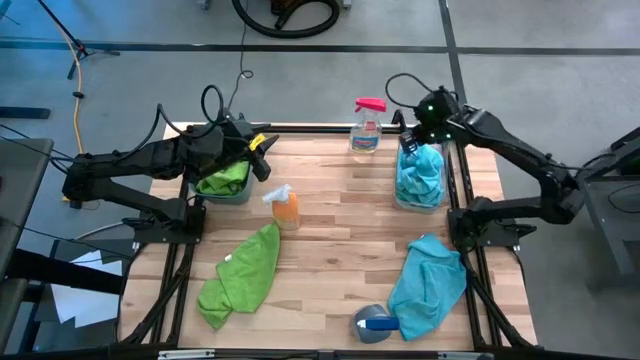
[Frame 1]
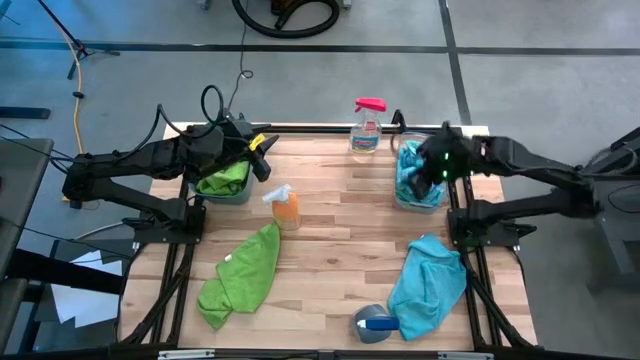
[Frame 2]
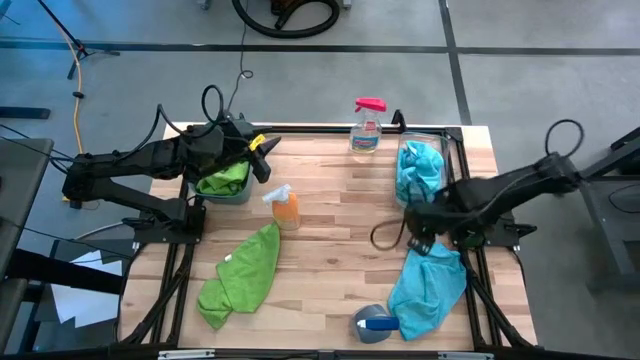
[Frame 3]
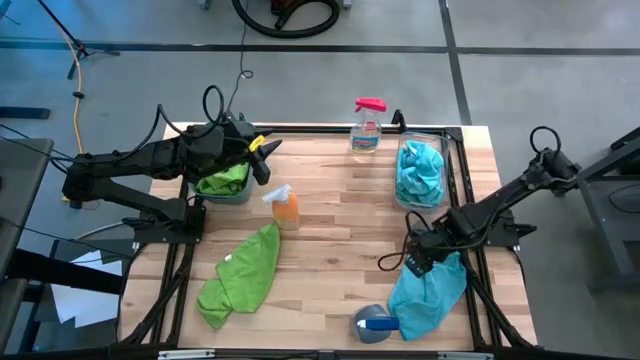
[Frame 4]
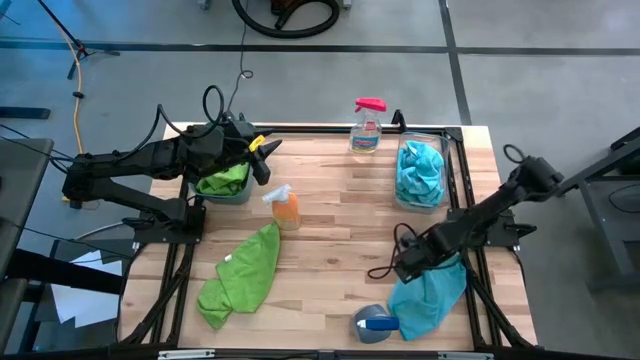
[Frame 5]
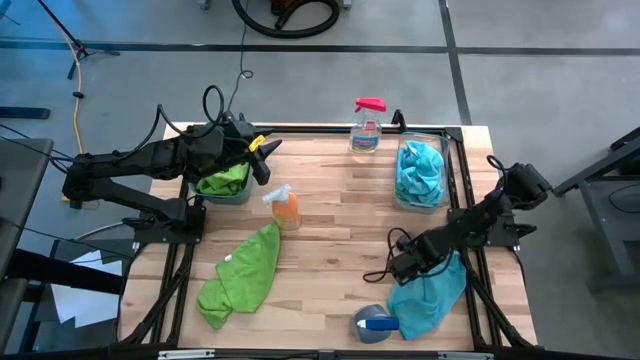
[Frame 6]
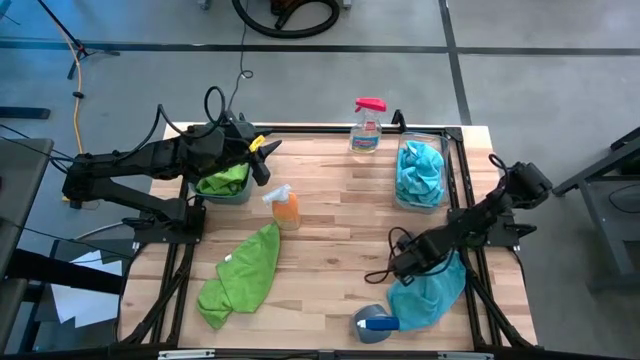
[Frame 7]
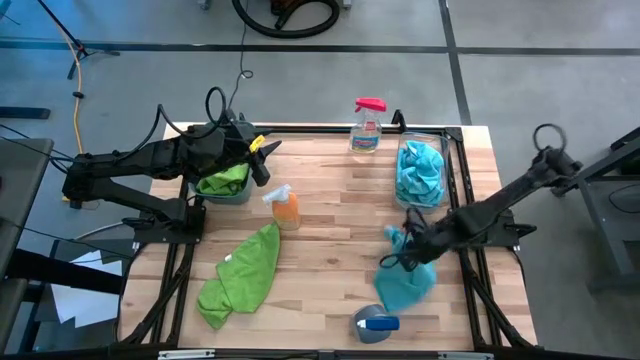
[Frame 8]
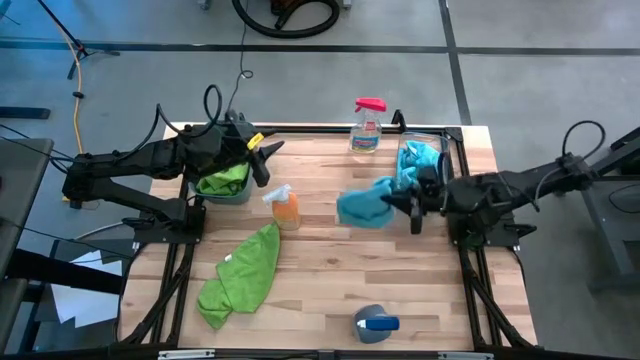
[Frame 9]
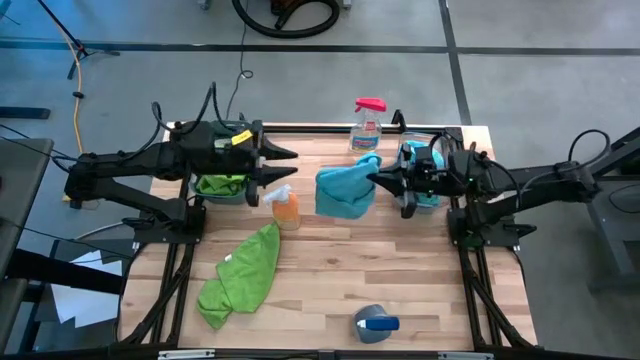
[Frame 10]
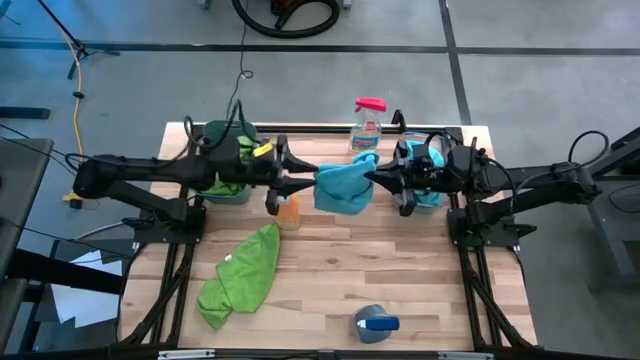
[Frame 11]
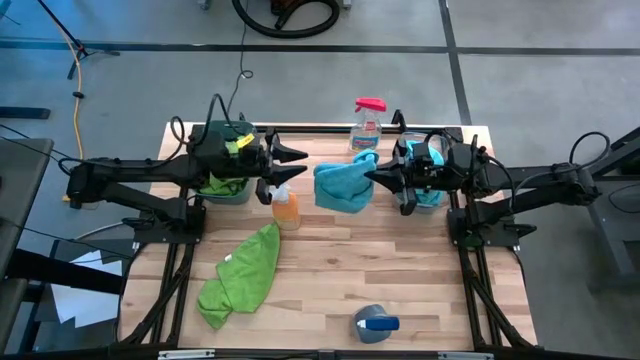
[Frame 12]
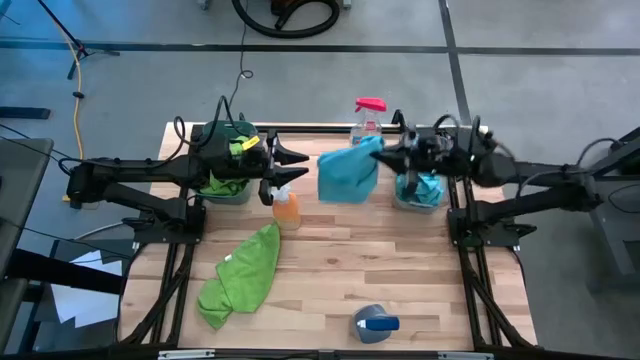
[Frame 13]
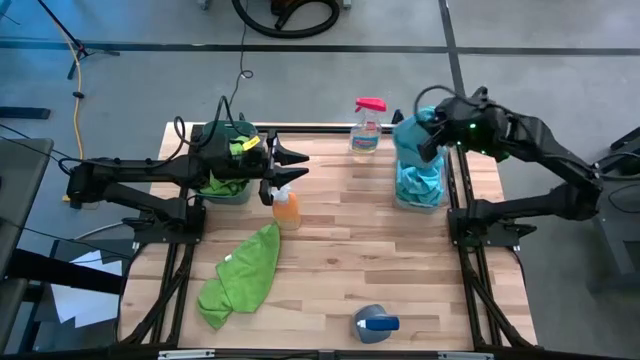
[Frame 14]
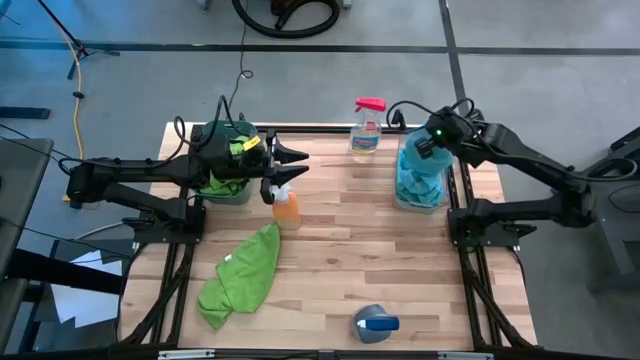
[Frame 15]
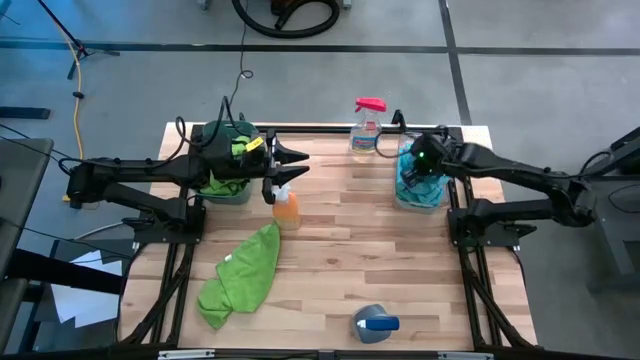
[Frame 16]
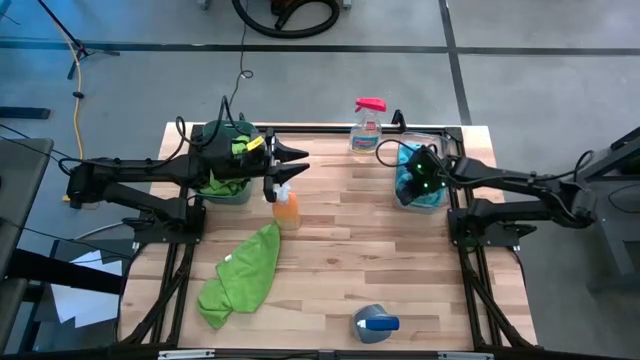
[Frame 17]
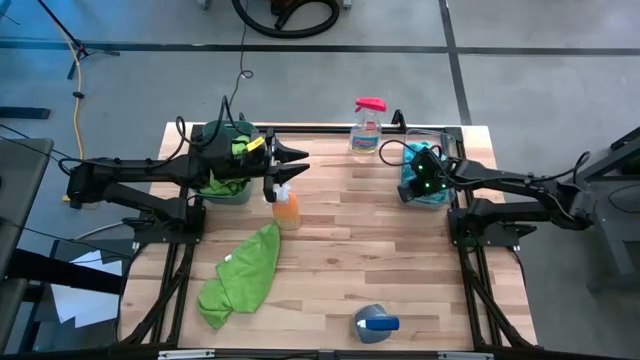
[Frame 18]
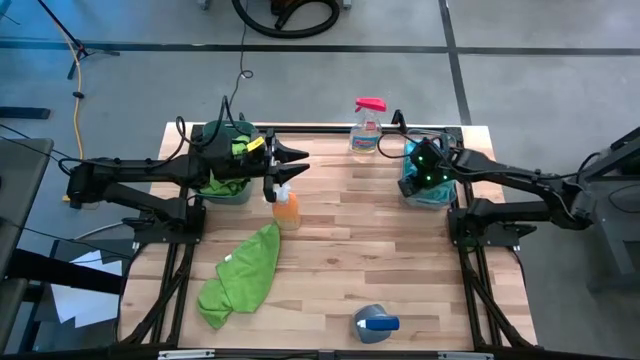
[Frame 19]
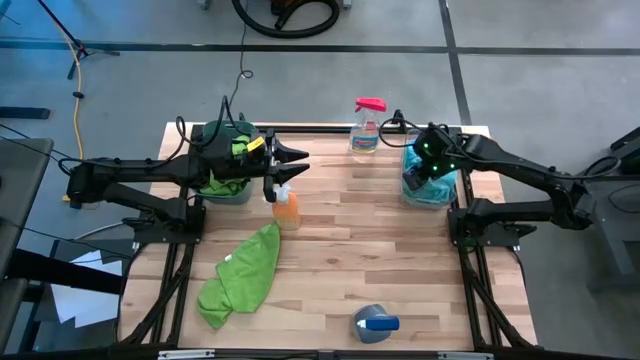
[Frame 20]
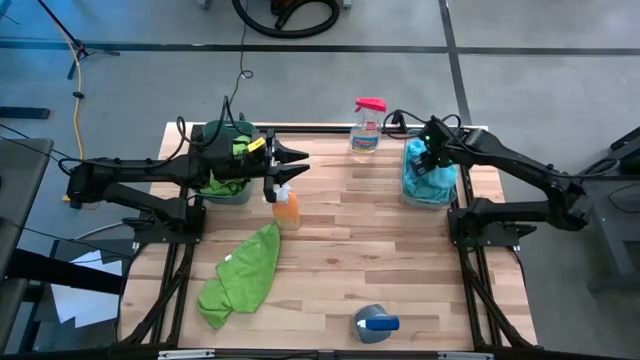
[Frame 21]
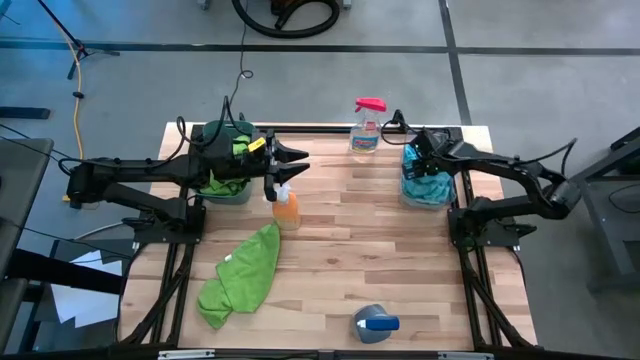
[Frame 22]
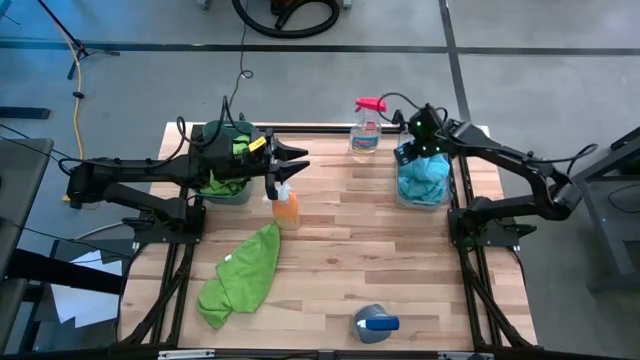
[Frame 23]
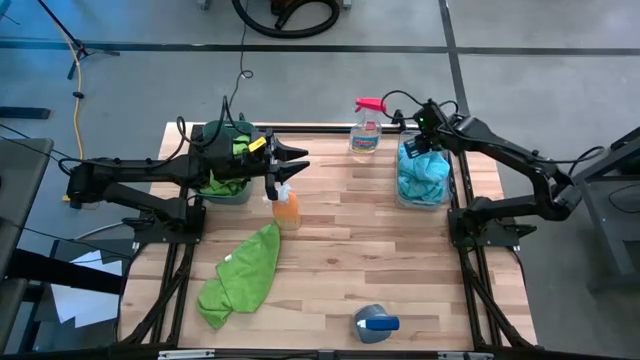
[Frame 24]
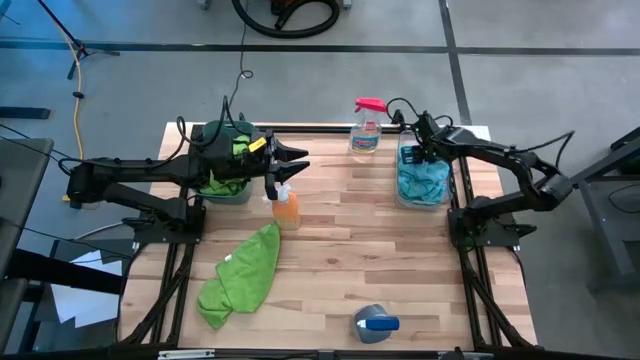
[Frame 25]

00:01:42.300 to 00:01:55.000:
Task: Sort microfiber towel by color & place in baskets
Put the blue microfiber towel into the transparent bin

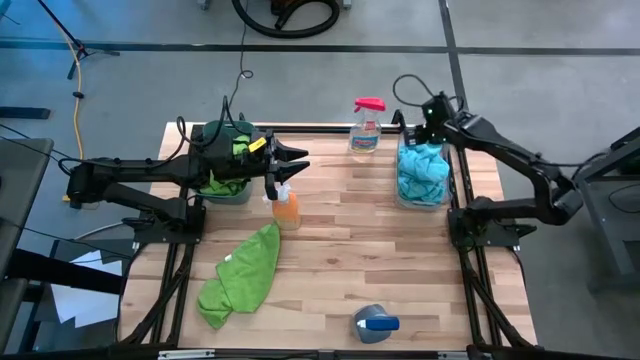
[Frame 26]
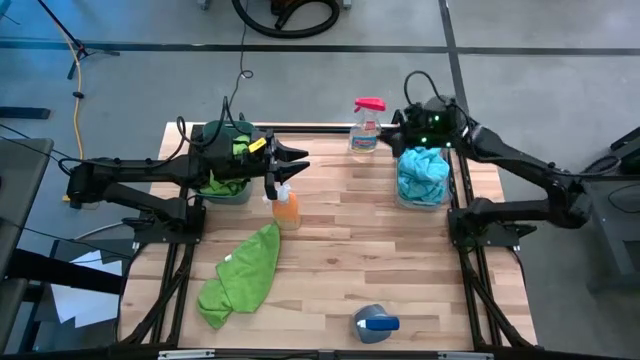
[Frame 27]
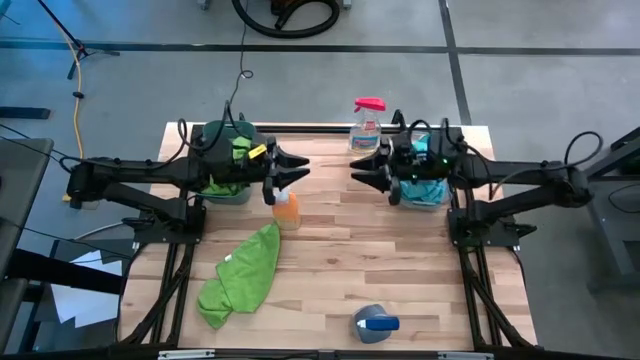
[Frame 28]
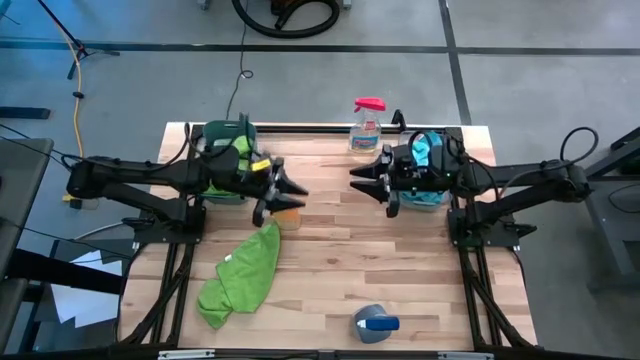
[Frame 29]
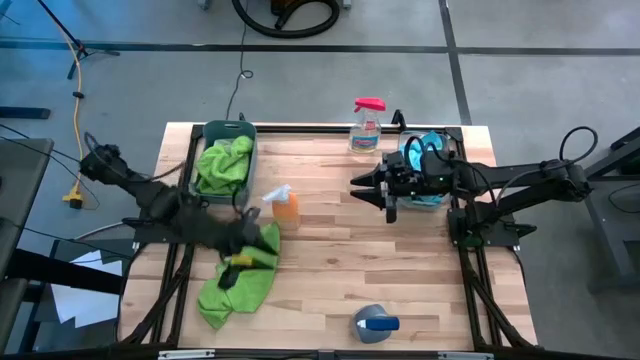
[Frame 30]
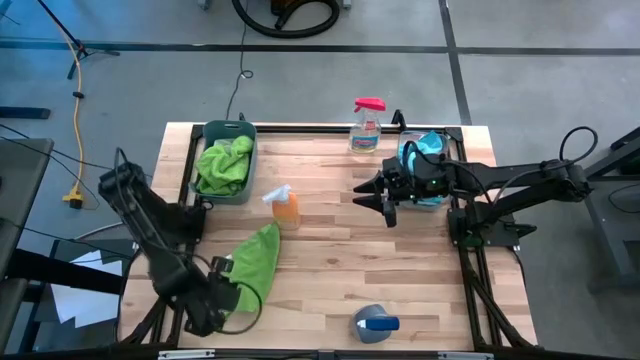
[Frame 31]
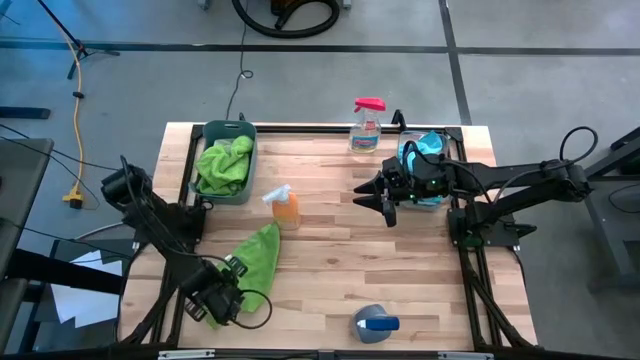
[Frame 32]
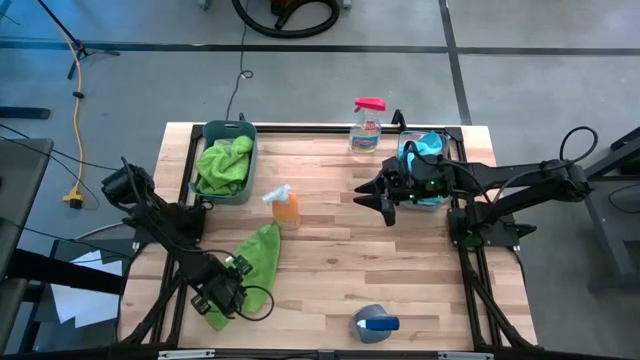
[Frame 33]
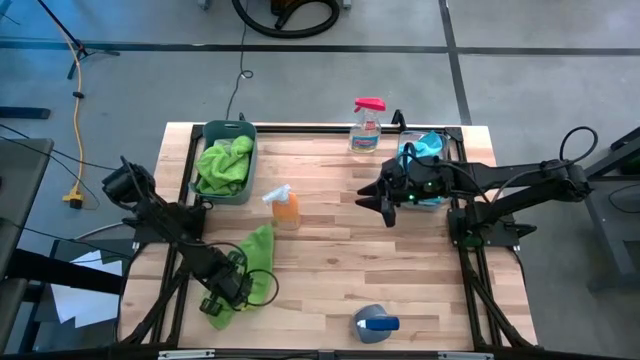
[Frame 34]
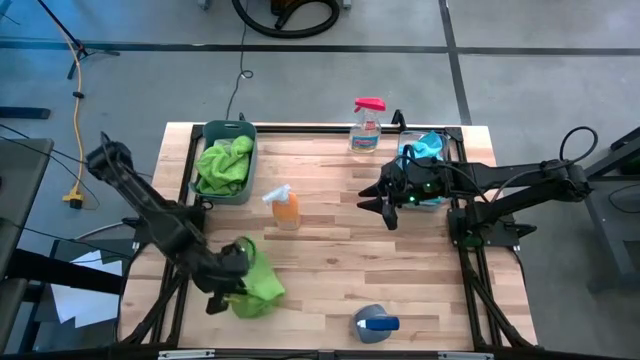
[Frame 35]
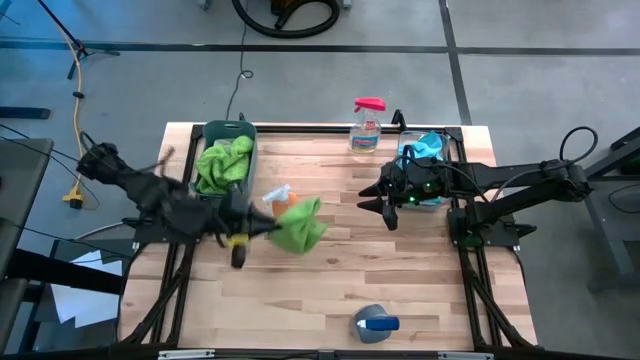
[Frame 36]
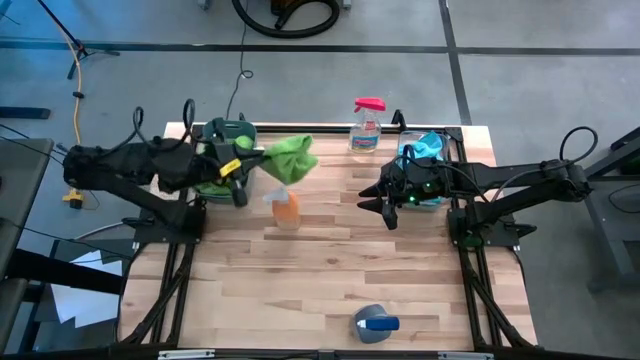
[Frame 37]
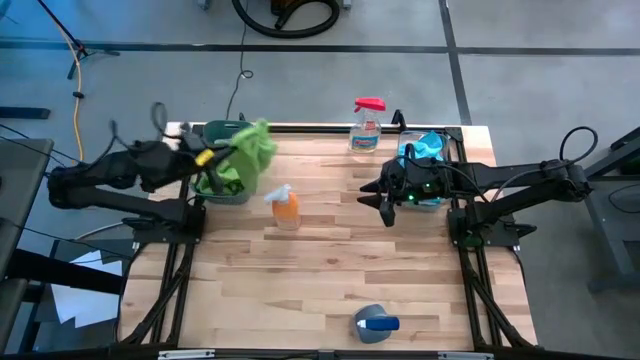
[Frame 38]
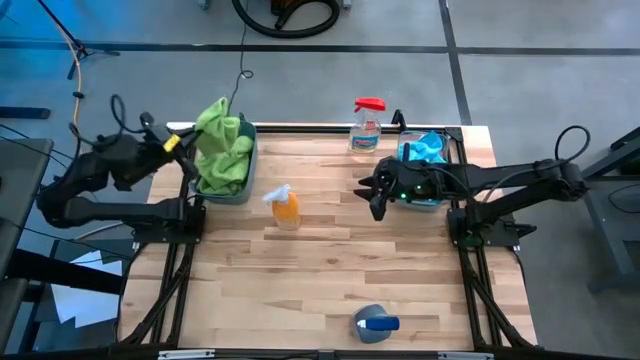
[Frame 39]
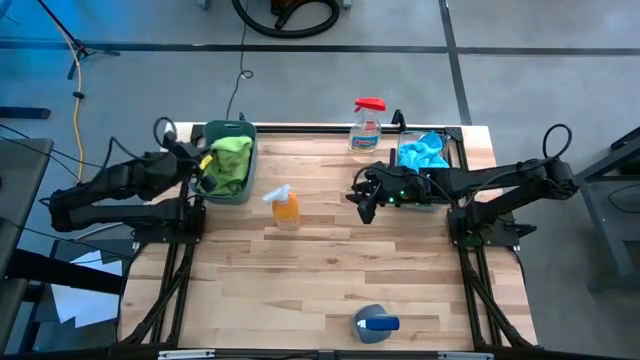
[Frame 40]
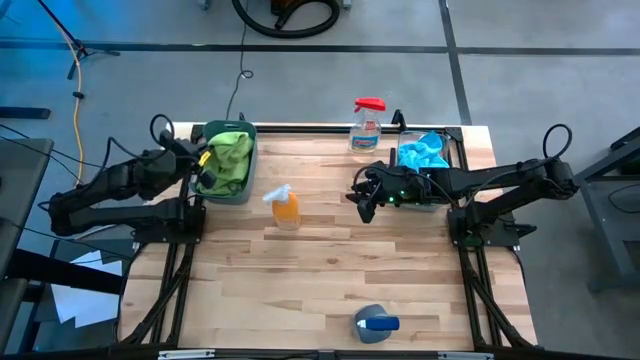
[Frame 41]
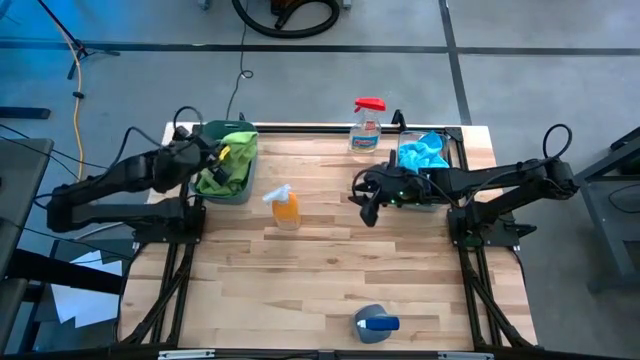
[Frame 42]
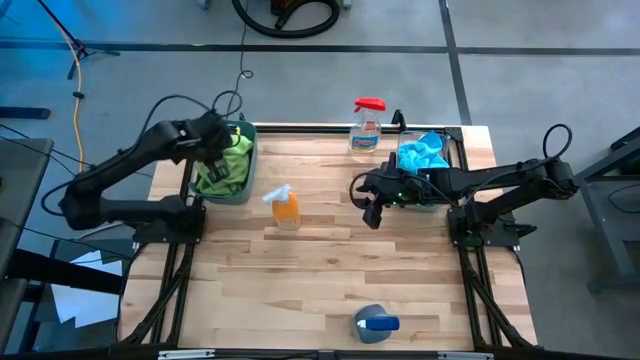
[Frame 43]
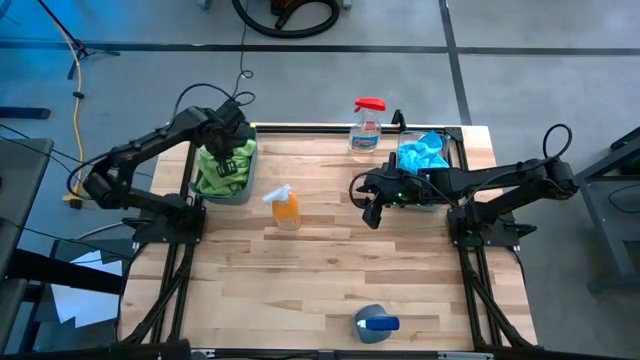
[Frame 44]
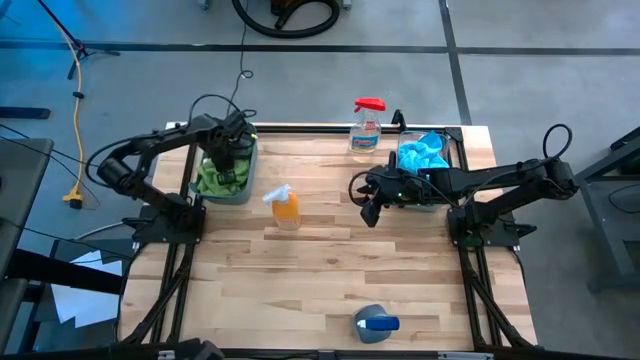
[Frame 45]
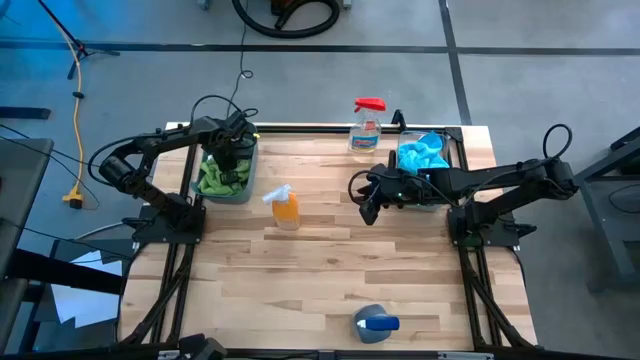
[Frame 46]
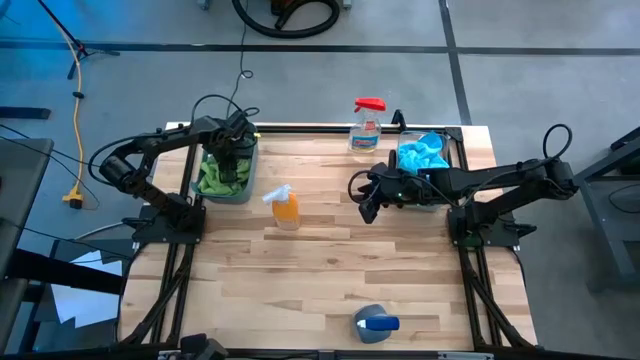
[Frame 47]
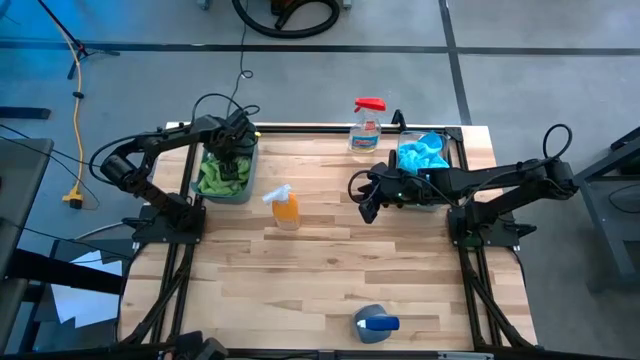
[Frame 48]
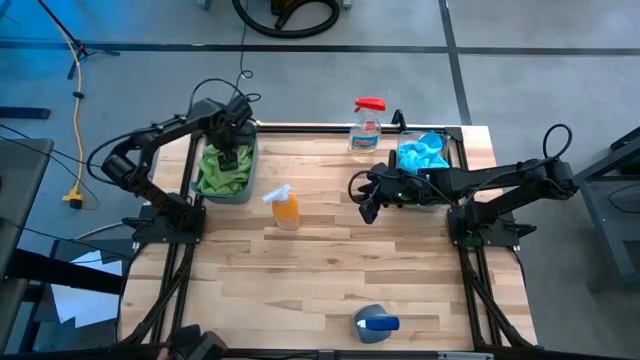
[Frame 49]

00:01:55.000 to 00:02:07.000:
Put the green microfiber towel into the green bin
